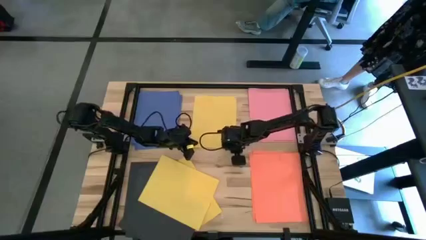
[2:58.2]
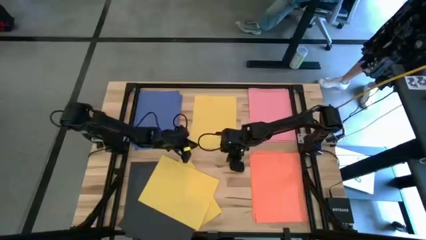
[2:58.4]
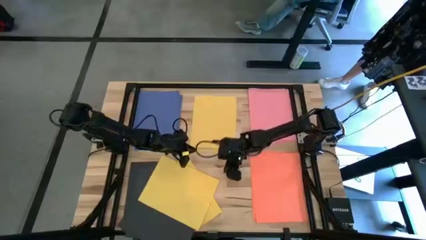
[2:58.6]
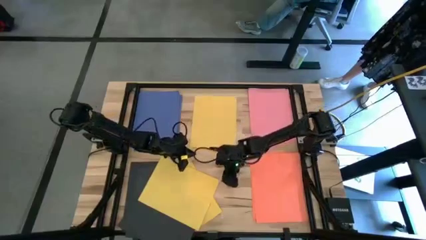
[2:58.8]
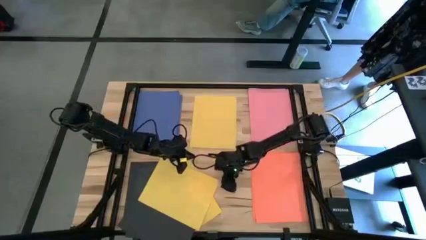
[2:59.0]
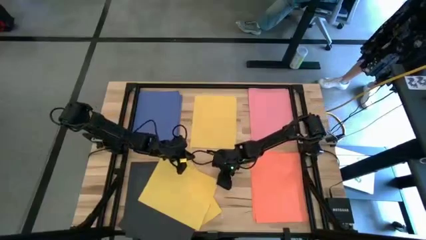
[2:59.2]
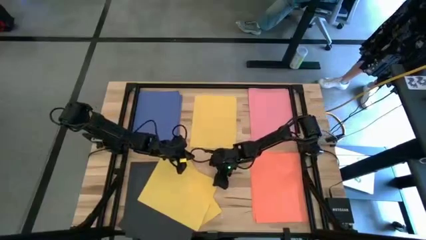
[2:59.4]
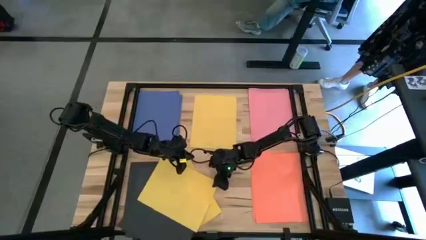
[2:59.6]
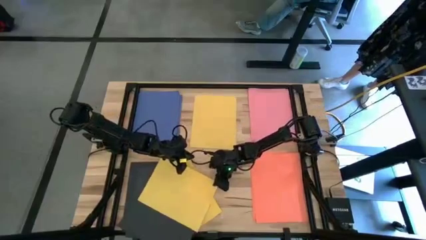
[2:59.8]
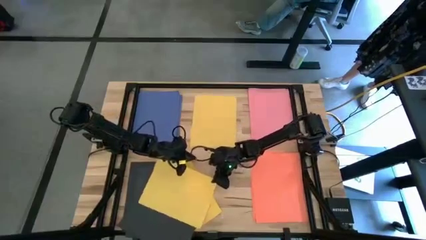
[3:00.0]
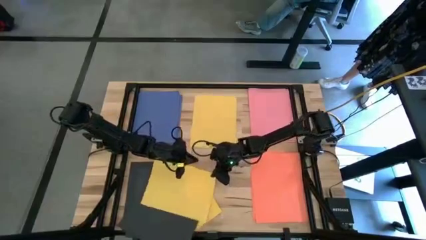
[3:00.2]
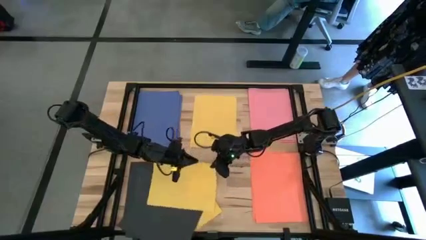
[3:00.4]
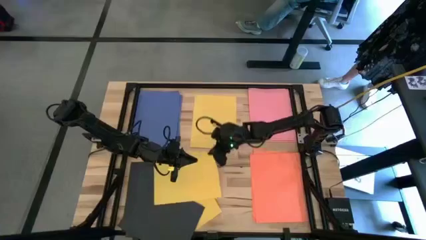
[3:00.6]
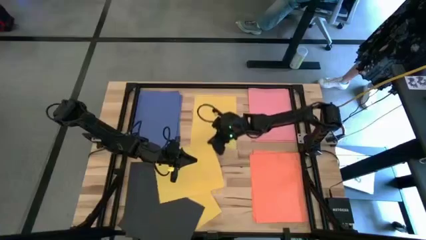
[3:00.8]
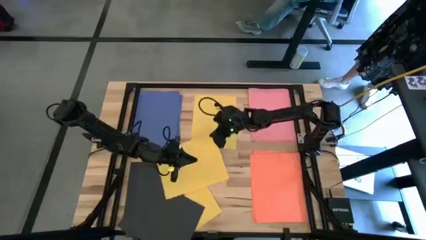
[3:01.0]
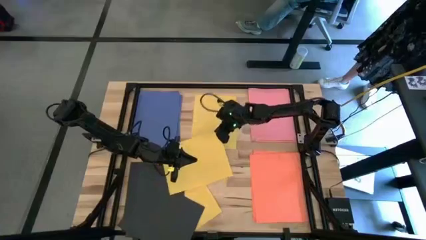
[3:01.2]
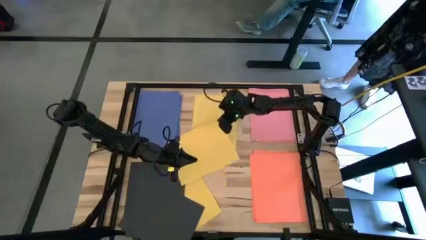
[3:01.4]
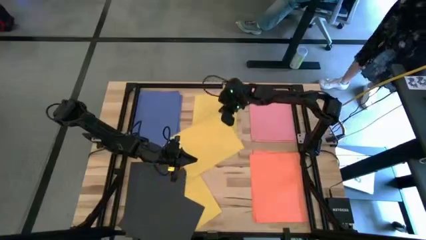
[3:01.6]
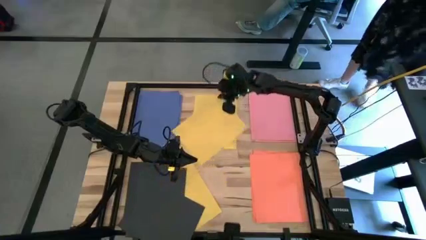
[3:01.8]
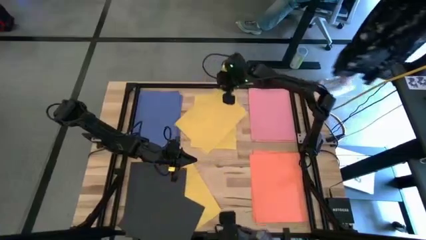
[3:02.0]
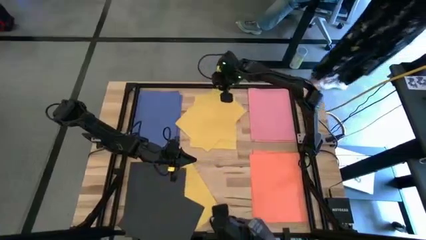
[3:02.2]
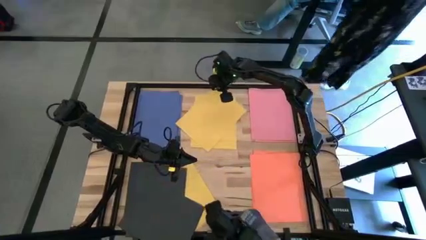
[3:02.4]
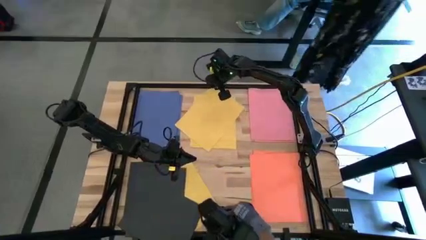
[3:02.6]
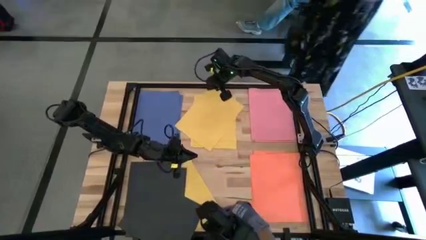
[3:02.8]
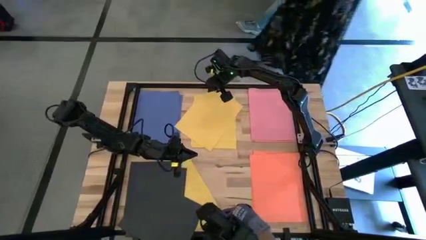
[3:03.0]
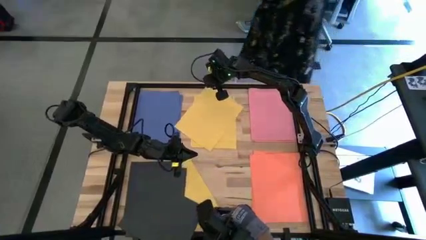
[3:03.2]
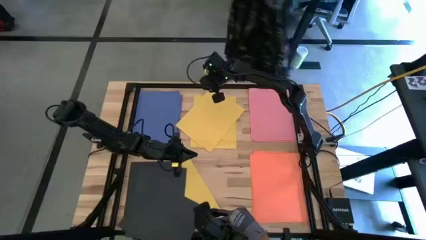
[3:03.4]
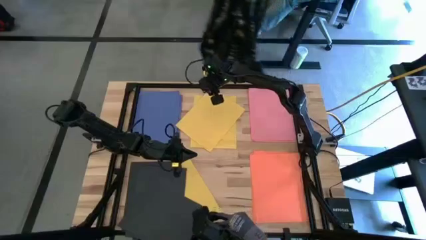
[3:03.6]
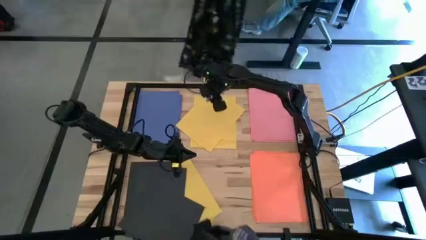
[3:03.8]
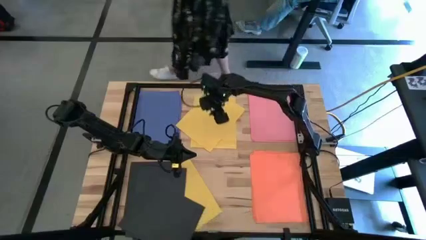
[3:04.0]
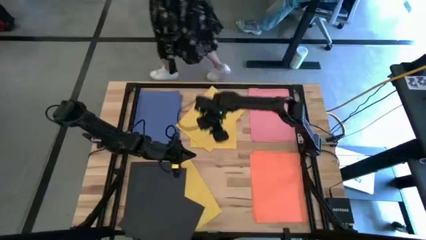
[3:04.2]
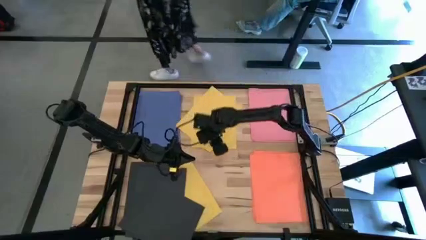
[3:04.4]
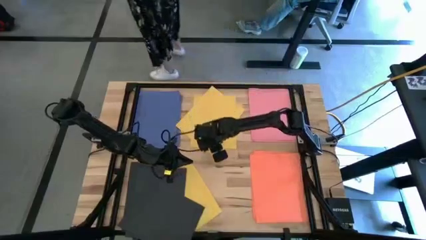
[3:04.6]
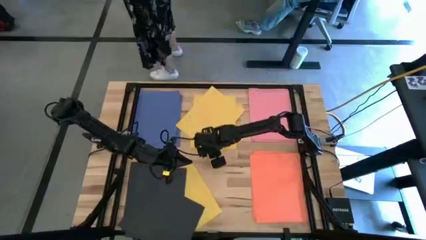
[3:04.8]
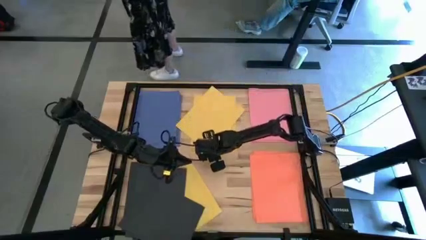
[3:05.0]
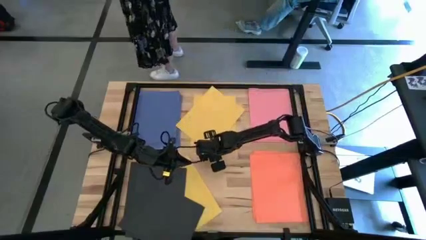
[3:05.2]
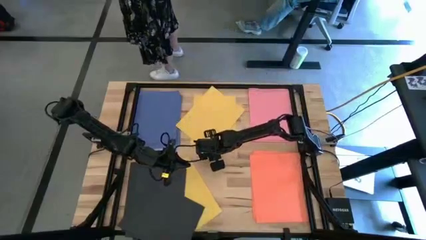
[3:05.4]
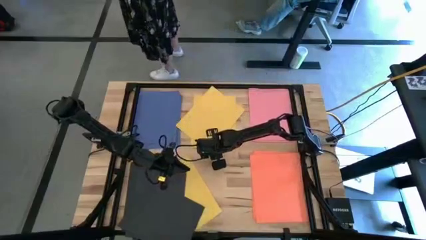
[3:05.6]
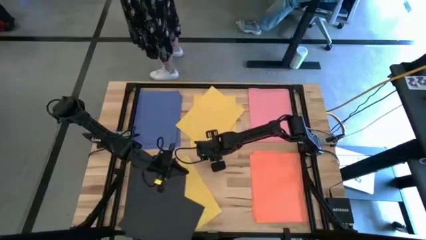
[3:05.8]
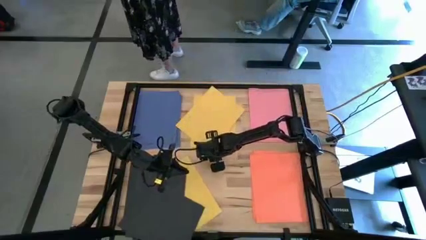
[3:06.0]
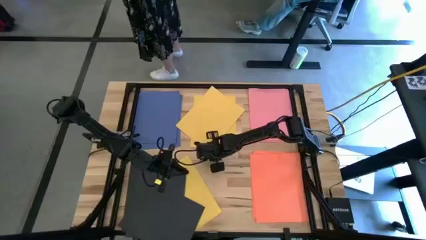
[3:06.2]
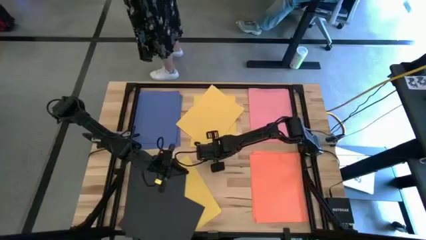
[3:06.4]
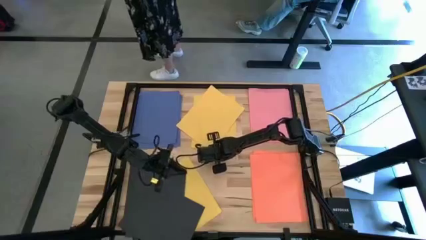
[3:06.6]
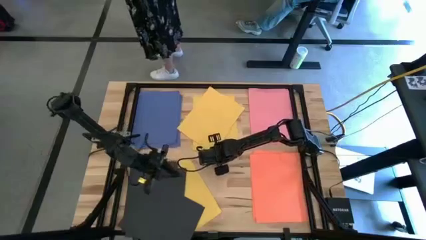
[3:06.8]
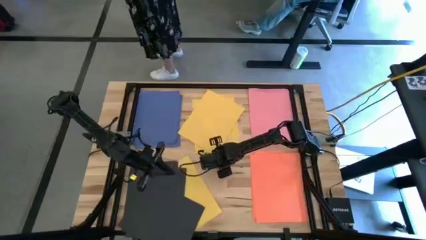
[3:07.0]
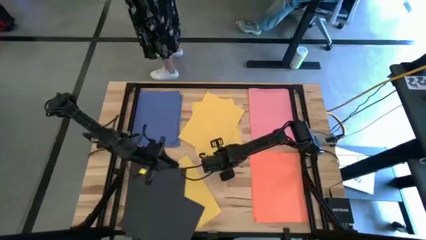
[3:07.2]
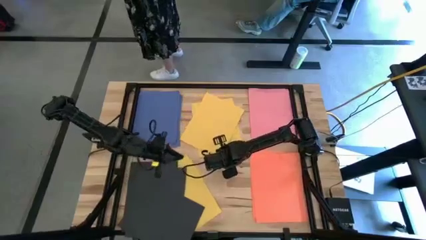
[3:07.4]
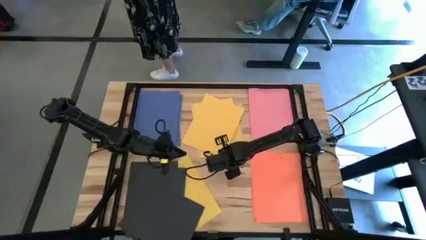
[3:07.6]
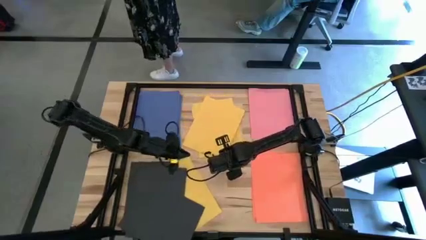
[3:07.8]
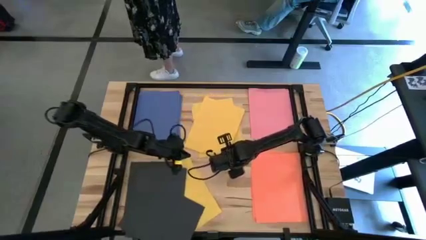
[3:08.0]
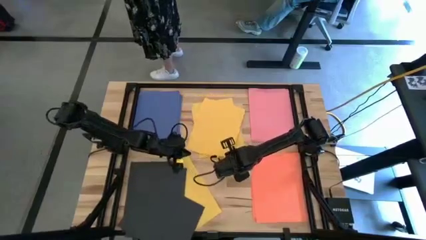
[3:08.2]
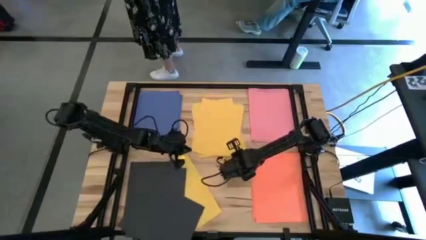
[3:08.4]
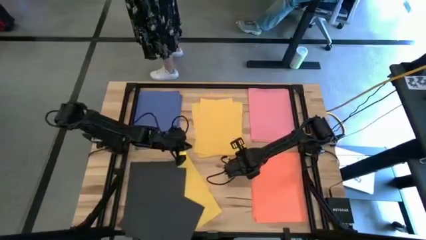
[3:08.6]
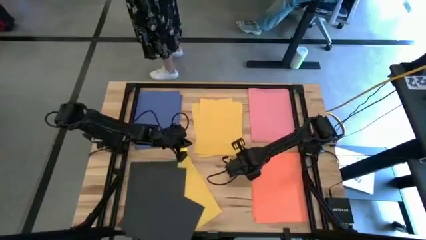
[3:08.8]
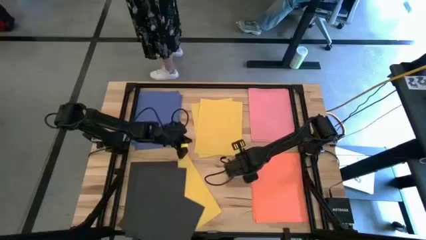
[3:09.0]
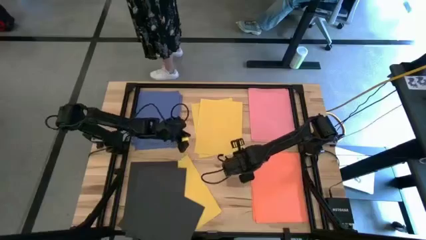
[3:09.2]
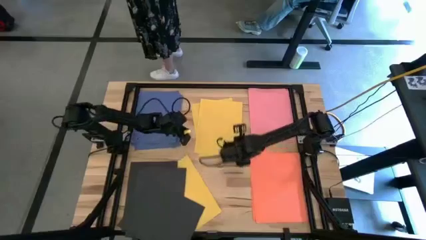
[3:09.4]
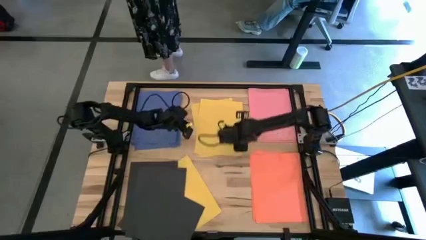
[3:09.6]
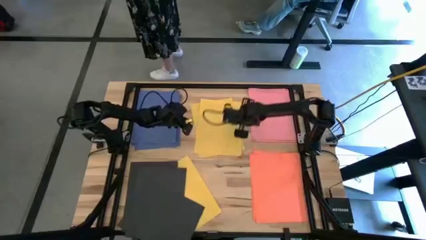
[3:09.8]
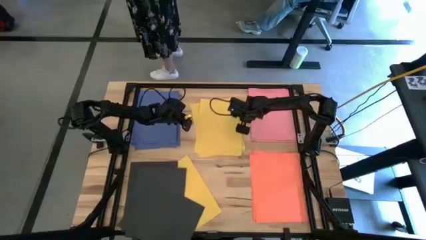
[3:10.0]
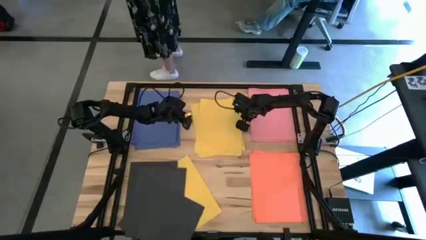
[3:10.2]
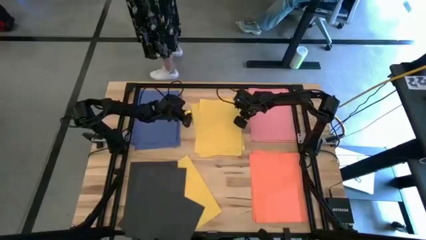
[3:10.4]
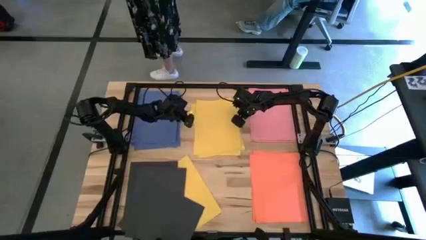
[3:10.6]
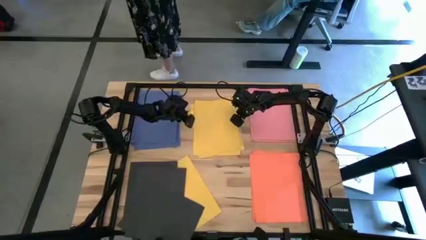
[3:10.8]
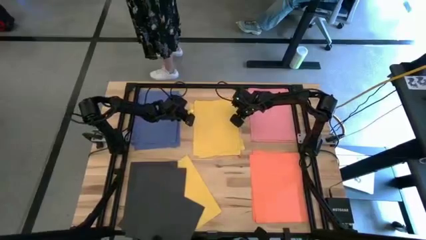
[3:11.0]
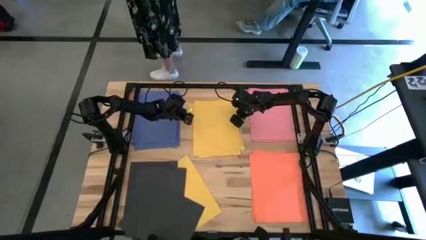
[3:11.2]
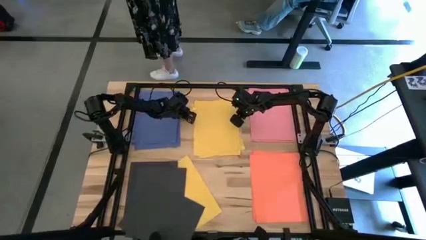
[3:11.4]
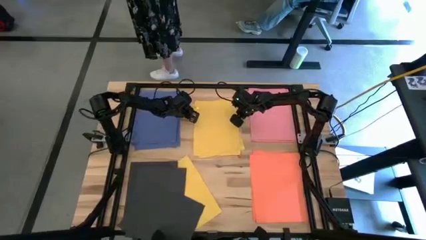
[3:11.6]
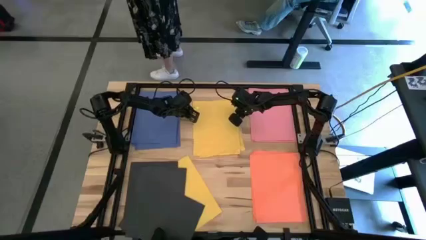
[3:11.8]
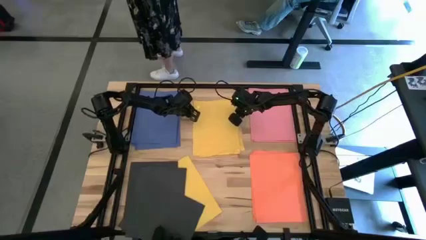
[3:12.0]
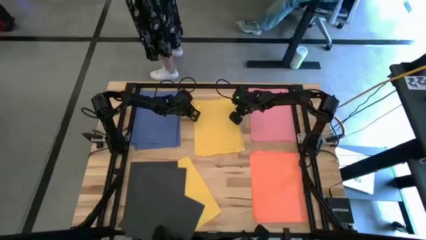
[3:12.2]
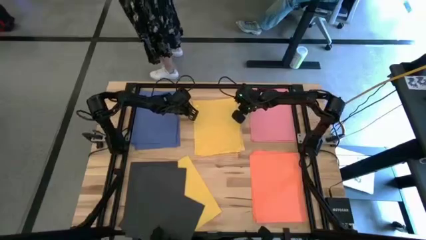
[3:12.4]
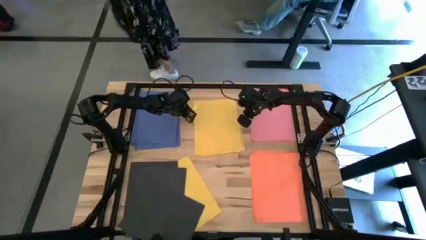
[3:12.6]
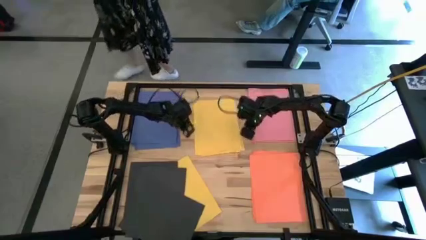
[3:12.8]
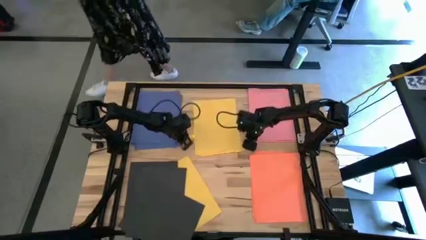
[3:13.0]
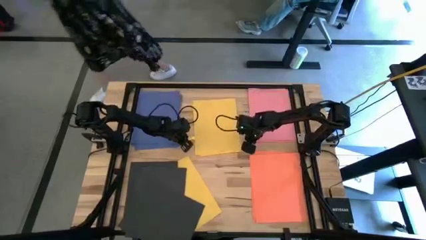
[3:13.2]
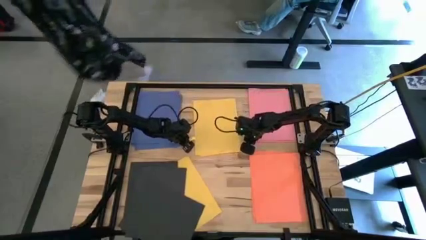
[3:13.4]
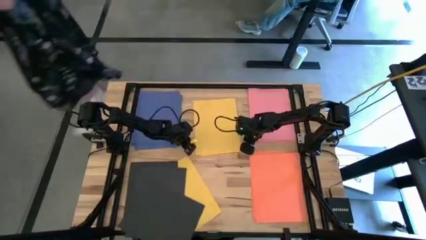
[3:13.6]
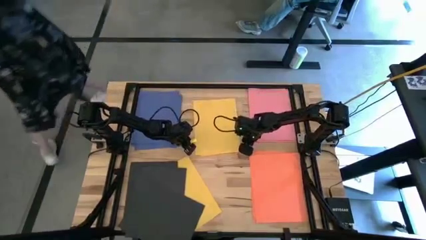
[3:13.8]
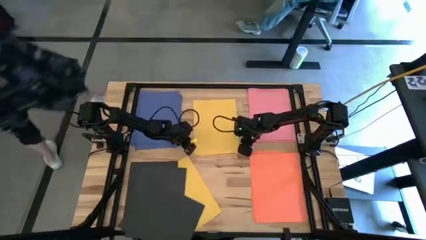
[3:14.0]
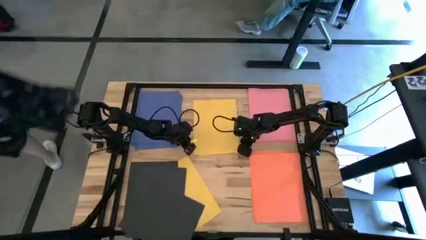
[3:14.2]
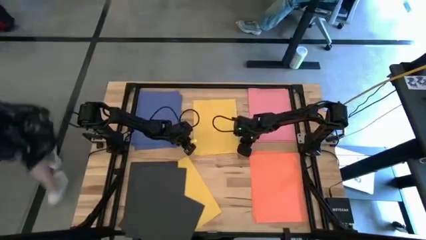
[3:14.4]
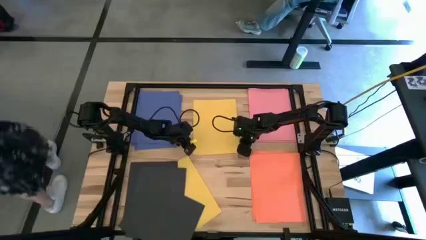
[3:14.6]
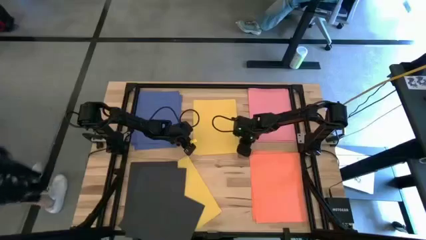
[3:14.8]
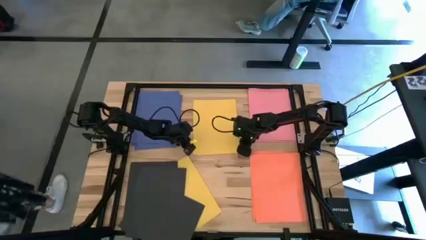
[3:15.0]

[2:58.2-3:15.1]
Task: Organize paper
Stack the yellow paper on top of the top yellow paper
